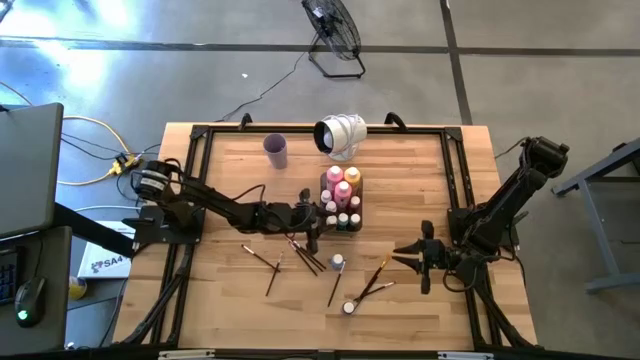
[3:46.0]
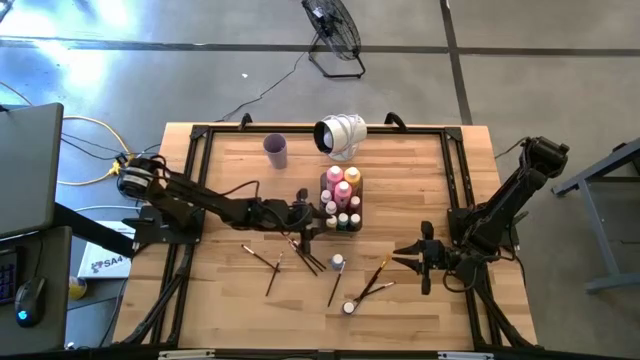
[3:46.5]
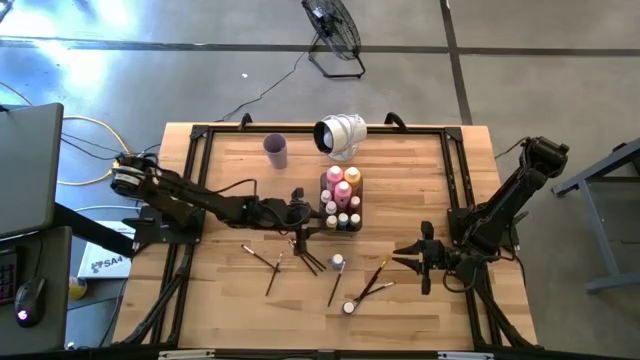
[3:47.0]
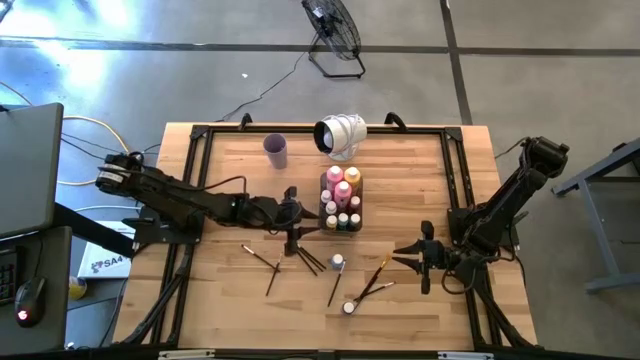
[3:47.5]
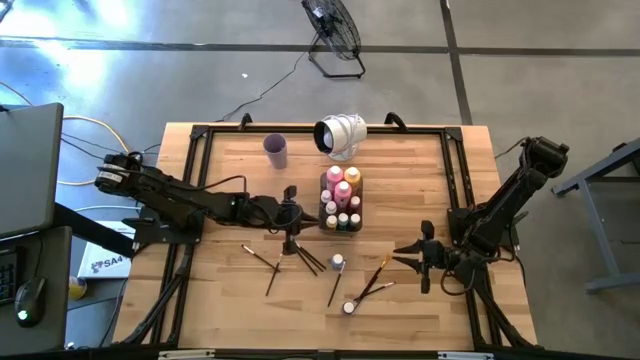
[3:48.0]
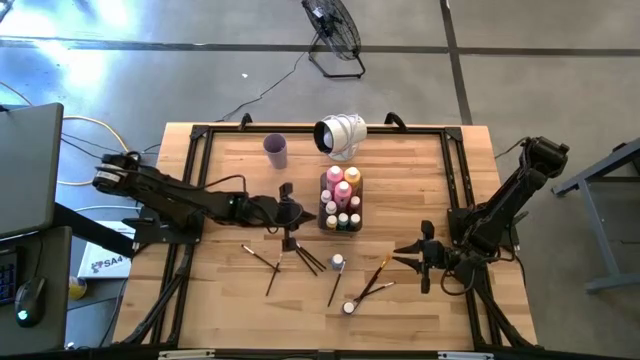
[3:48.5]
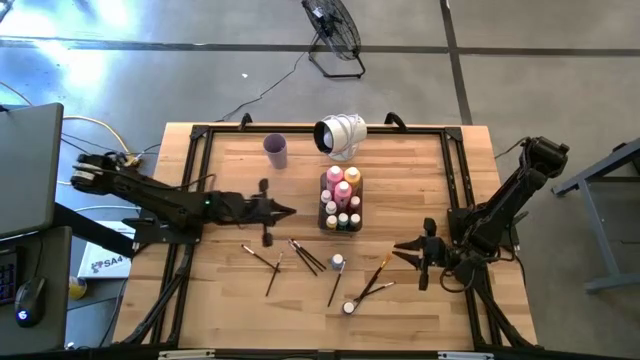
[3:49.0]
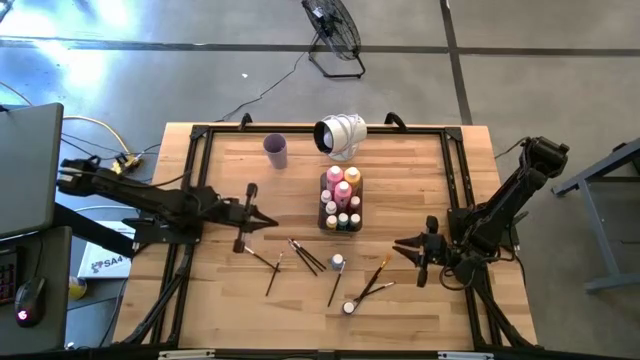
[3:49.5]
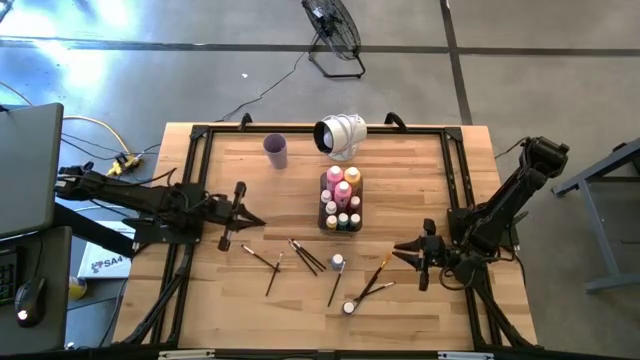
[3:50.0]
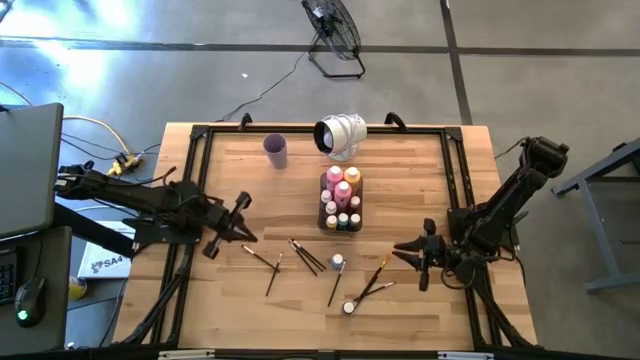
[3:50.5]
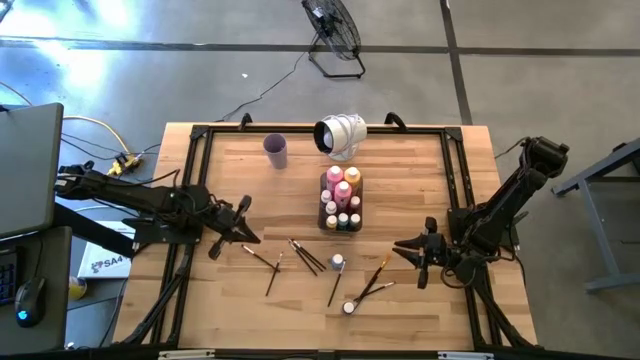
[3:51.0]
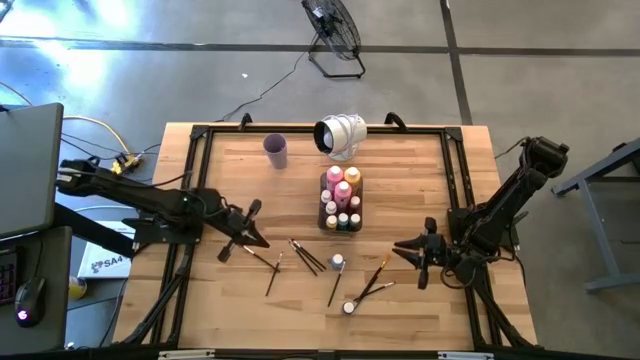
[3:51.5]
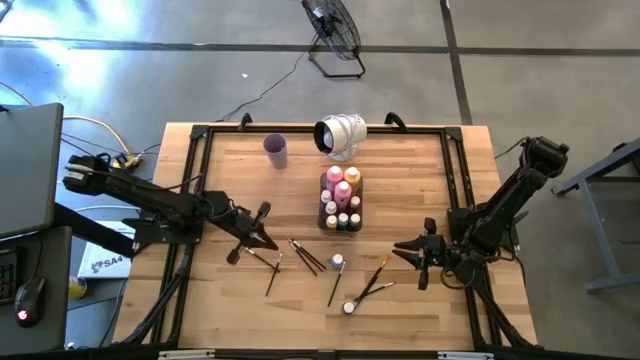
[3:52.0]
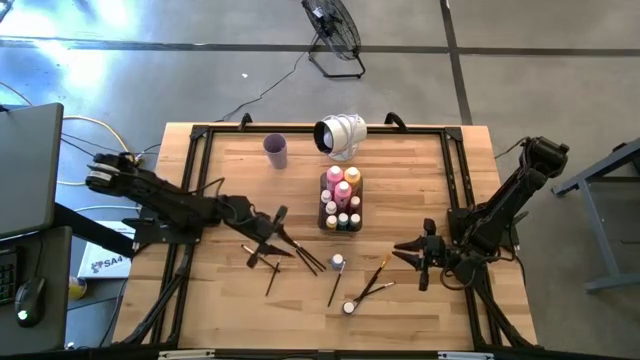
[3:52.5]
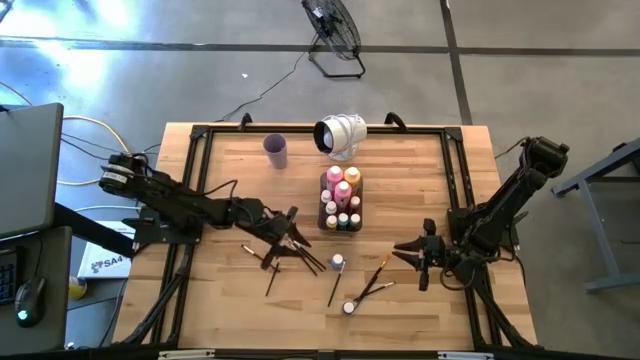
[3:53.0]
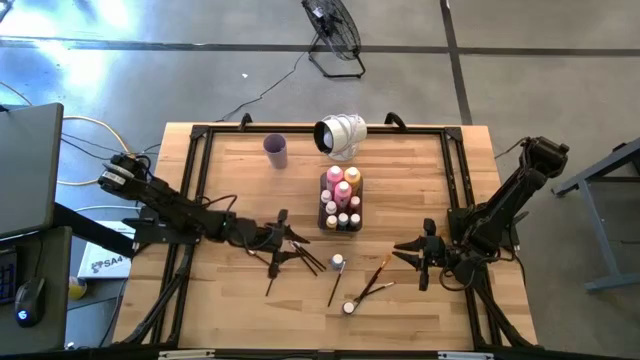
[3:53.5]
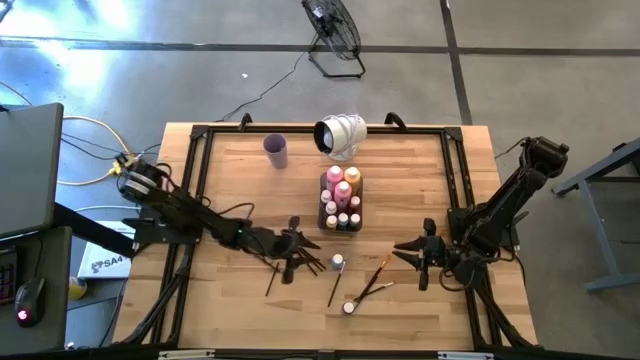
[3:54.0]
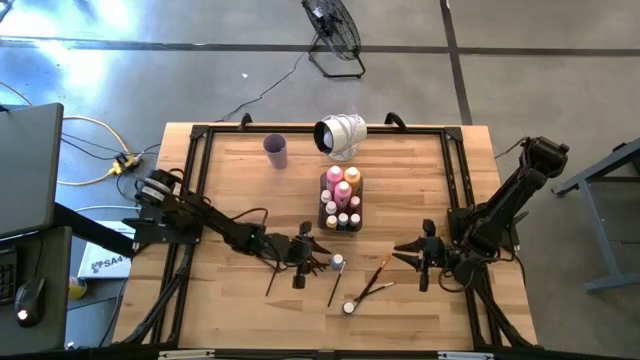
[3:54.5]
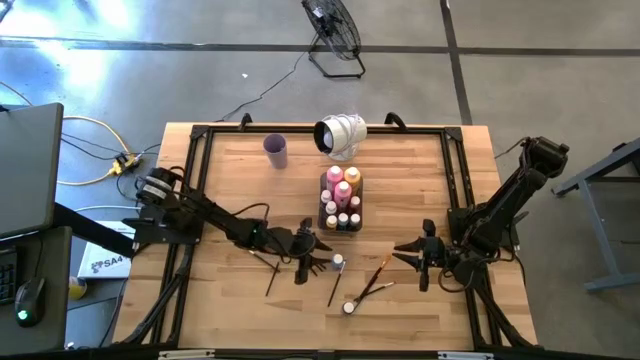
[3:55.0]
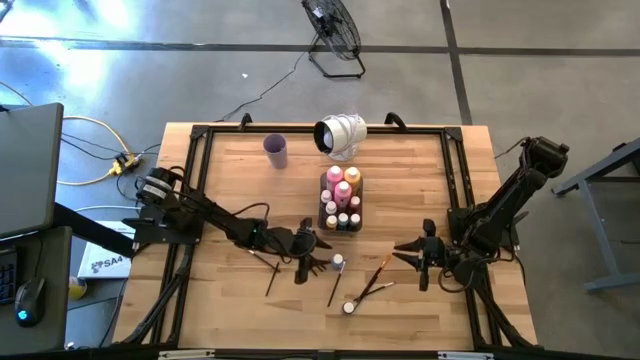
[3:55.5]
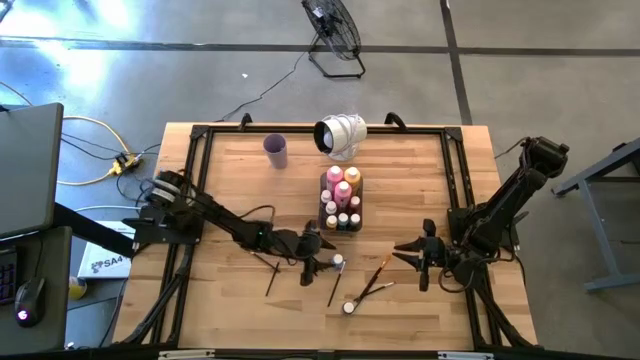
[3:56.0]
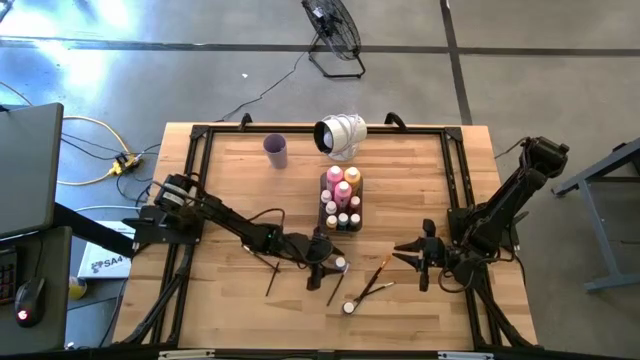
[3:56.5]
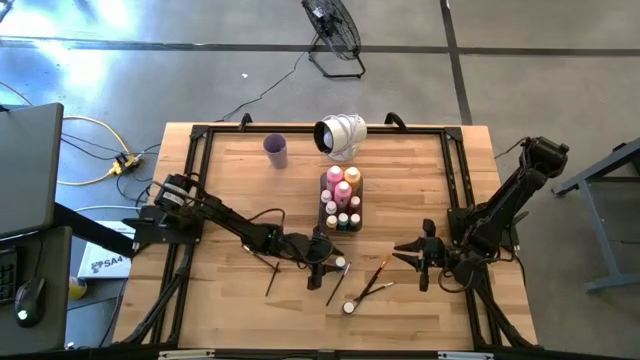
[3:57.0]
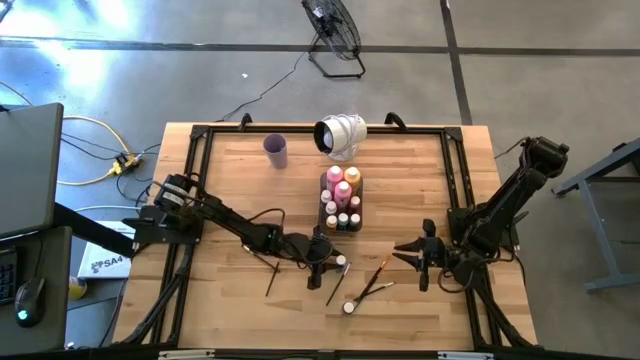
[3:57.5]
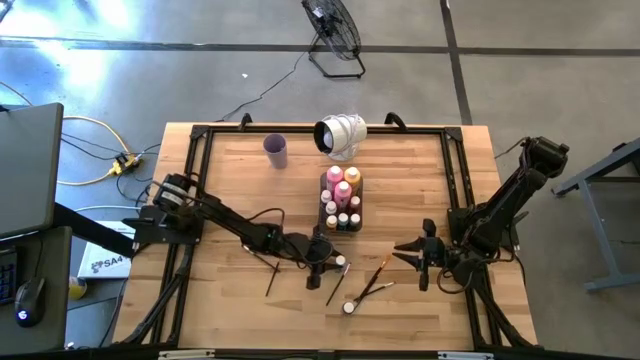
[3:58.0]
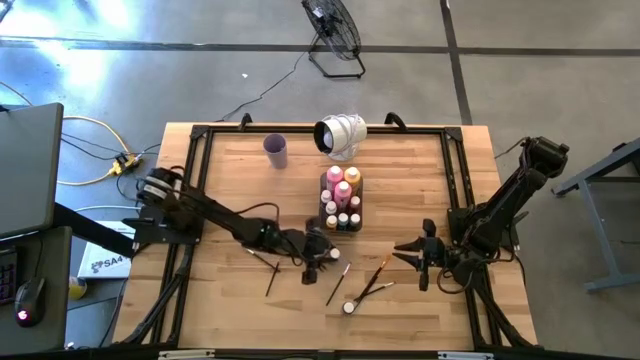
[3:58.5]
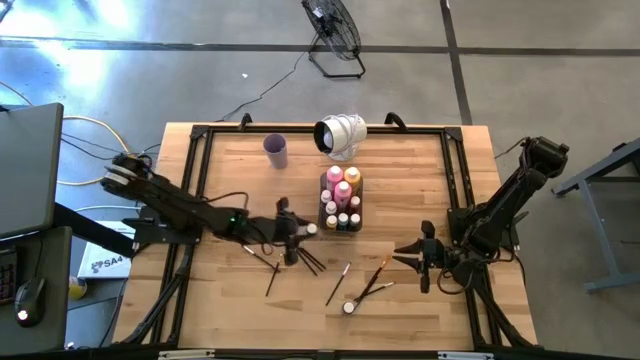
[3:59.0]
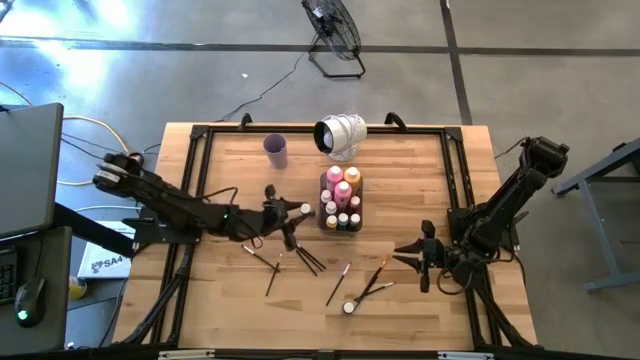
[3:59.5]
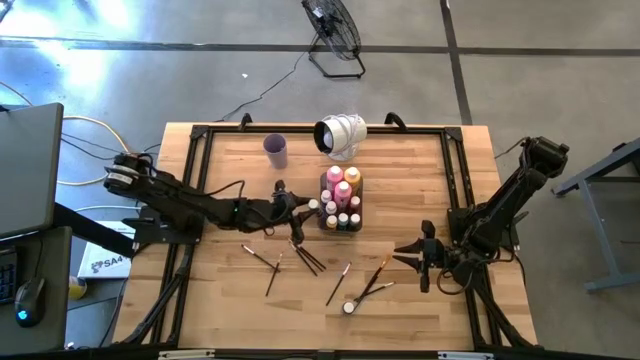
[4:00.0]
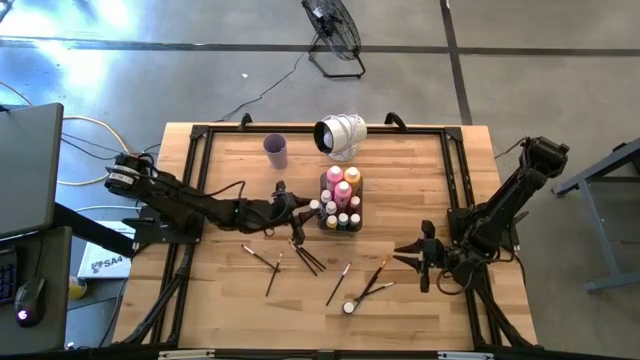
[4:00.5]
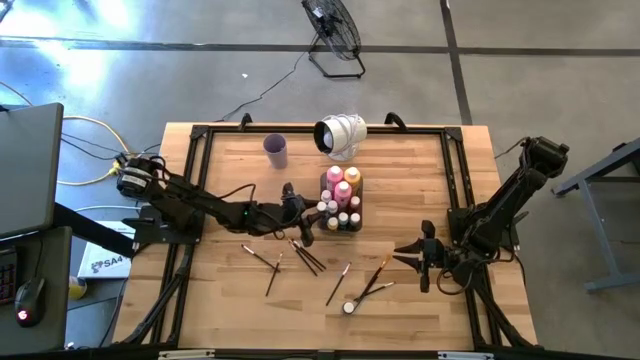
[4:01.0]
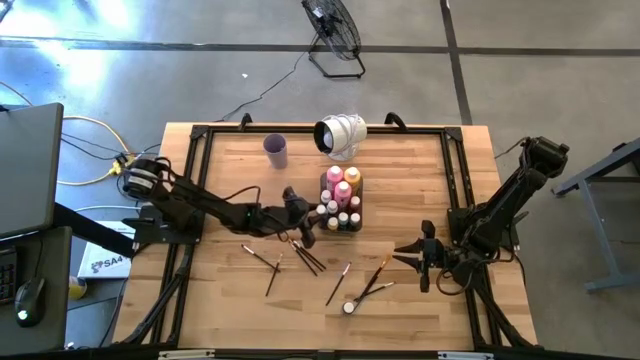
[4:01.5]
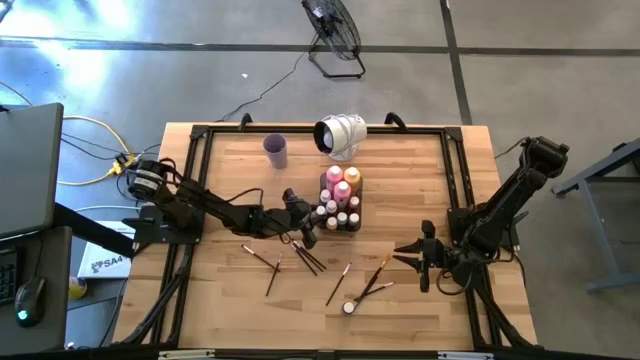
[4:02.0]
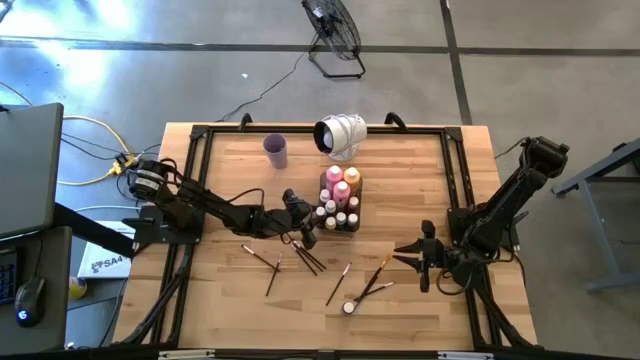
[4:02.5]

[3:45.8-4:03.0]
Task: Pick & Place Paint Supplies
Put the light blue paint bottle into the black bin

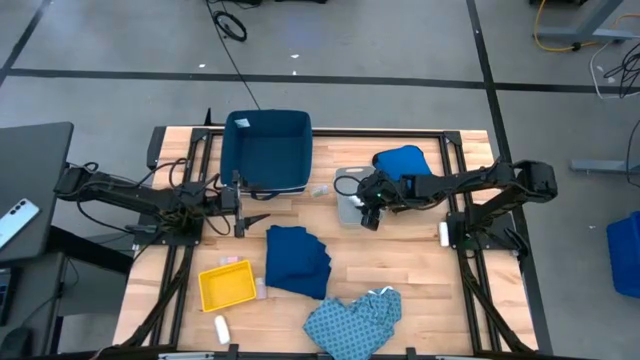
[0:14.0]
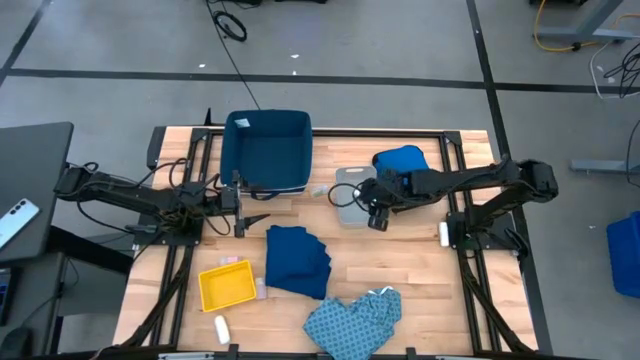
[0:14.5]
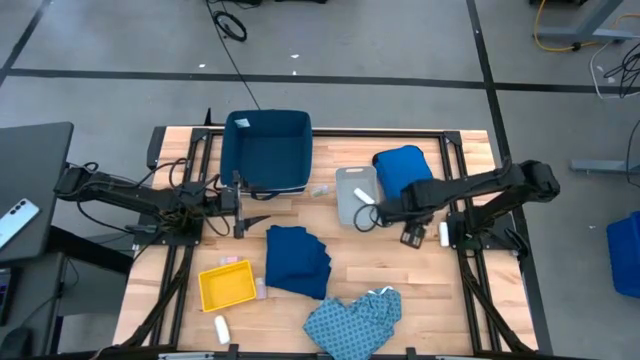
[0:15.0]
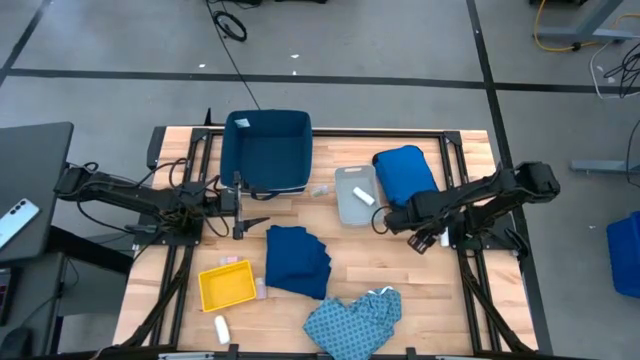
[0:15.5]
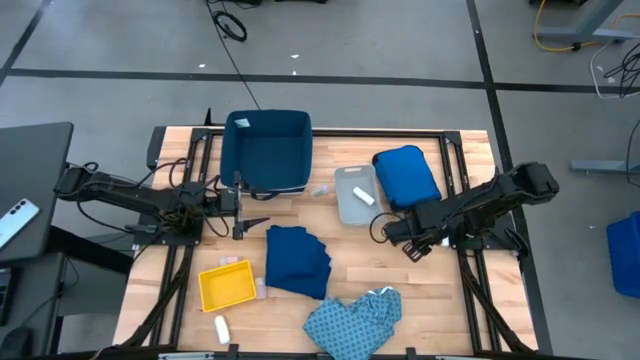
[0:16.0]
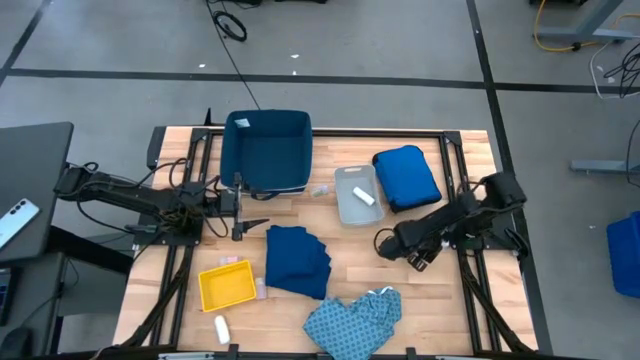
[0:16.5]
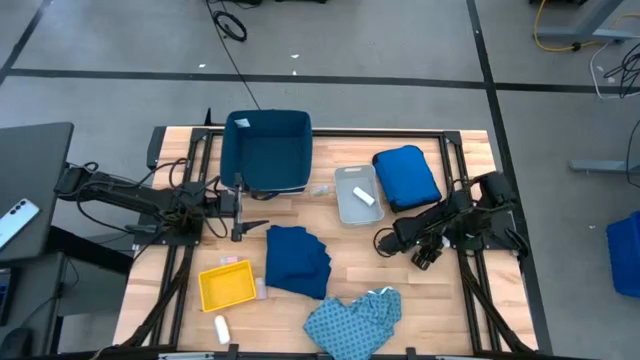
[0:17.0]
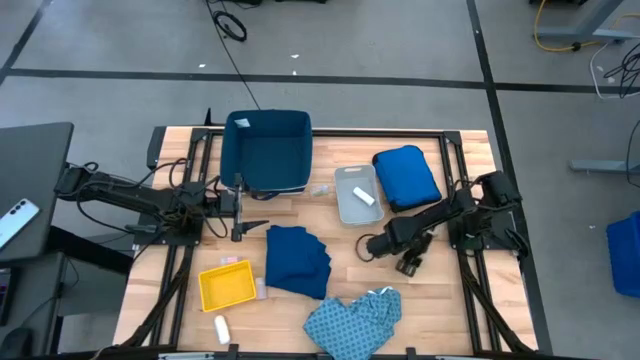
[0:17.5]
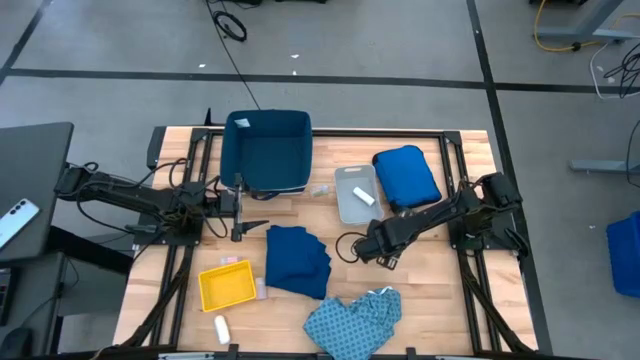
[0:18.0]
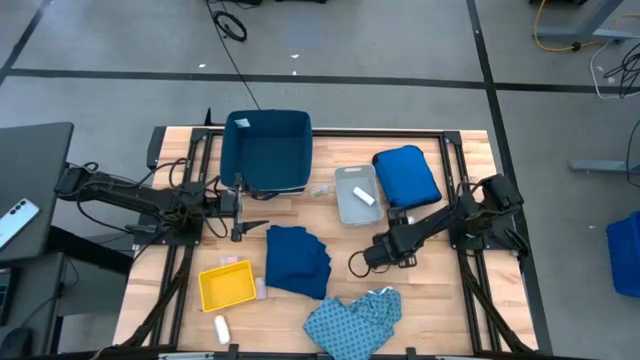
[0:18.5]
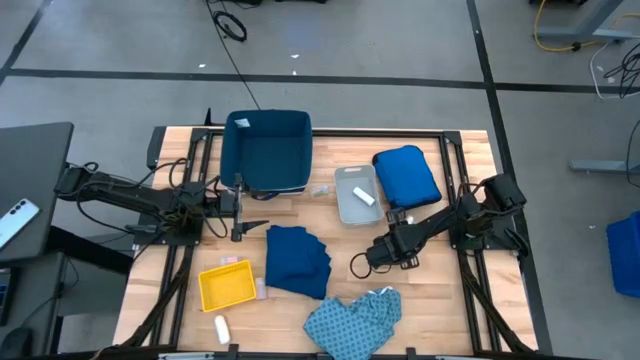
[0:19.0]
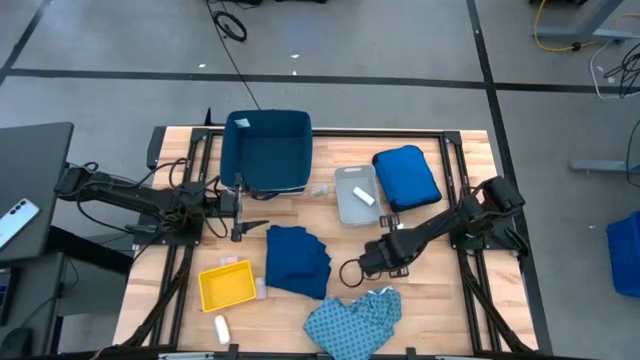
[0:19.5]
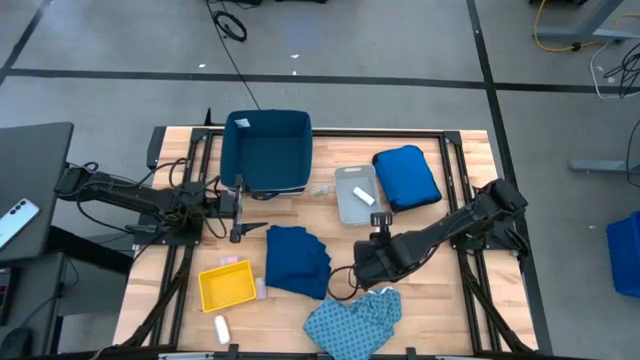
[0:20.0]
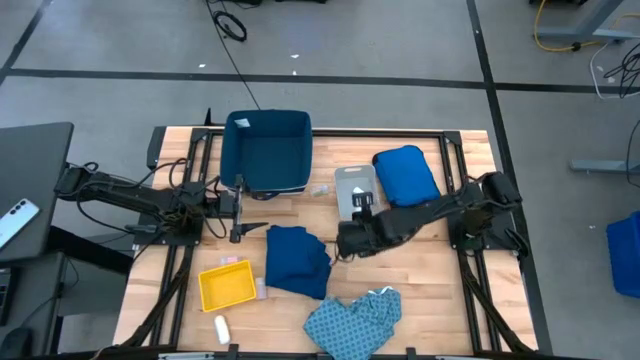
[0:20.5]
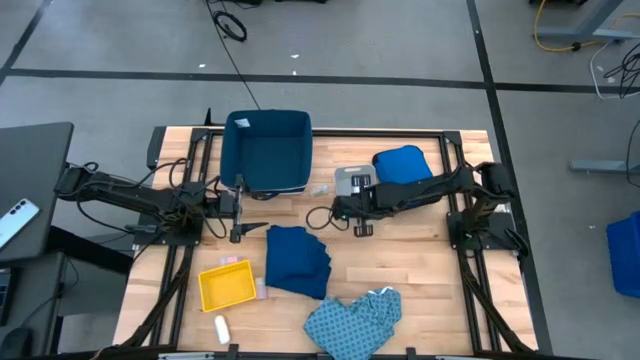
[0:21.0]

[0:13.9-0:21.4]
Task: Pick & place medical supplies in basket/bin
Put the right white rolled gauze into the gray bin
